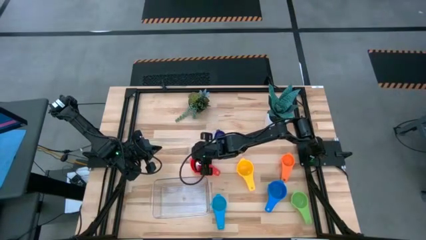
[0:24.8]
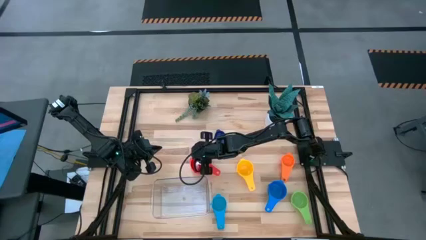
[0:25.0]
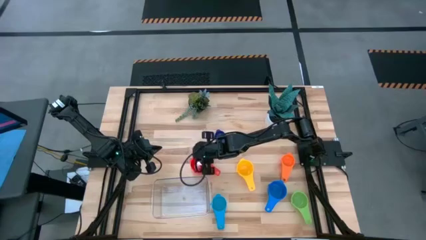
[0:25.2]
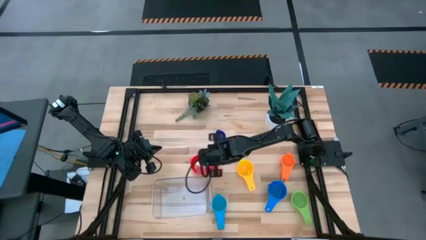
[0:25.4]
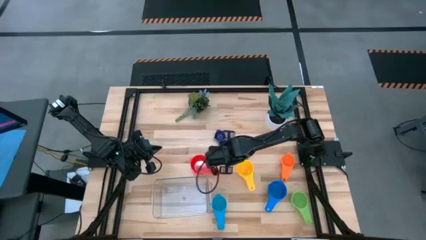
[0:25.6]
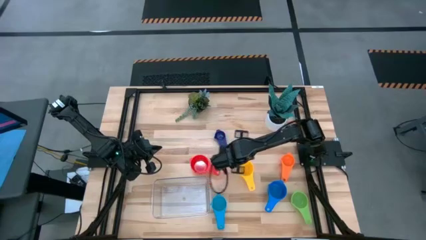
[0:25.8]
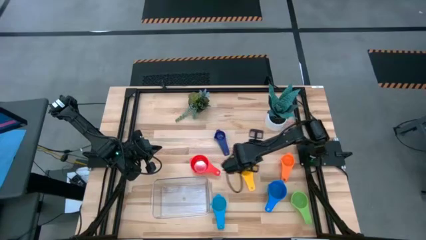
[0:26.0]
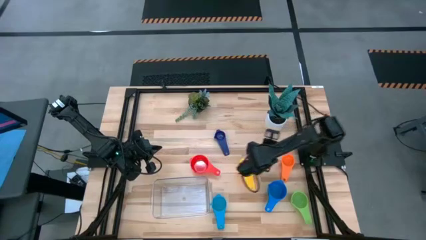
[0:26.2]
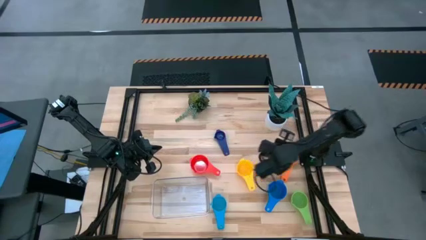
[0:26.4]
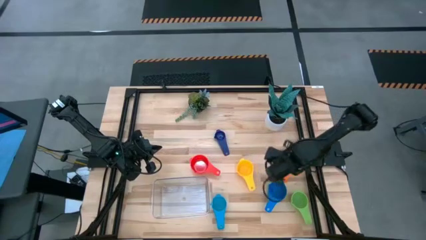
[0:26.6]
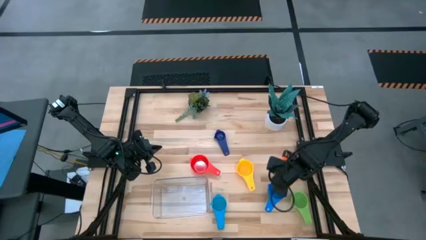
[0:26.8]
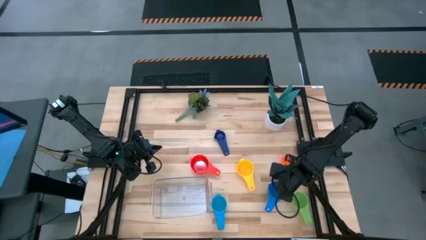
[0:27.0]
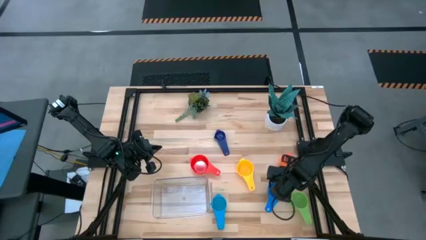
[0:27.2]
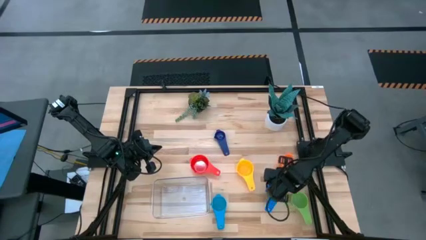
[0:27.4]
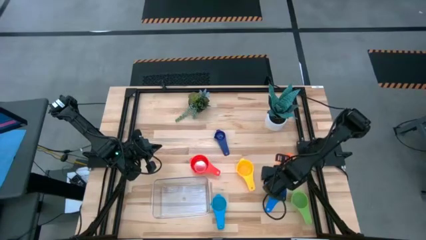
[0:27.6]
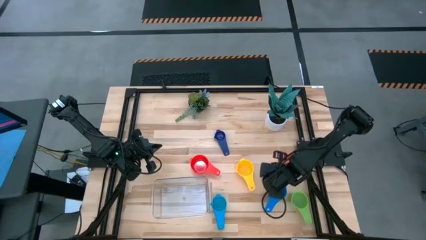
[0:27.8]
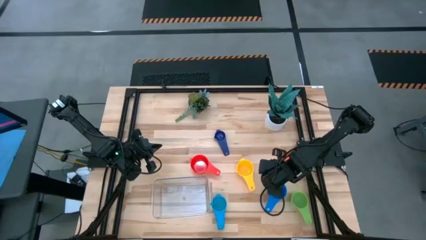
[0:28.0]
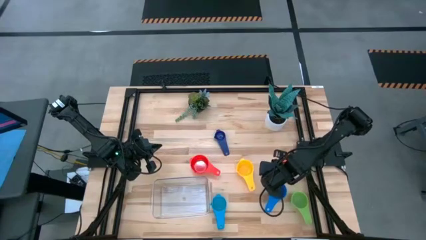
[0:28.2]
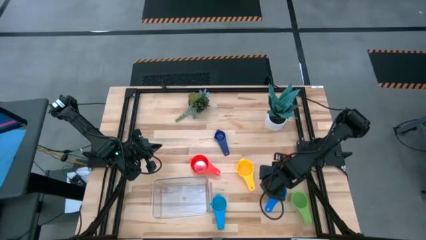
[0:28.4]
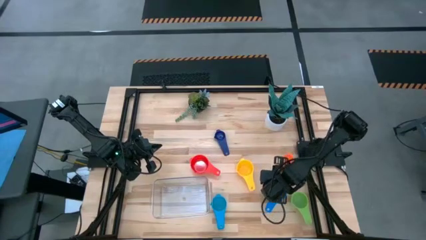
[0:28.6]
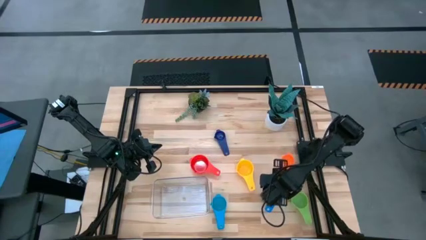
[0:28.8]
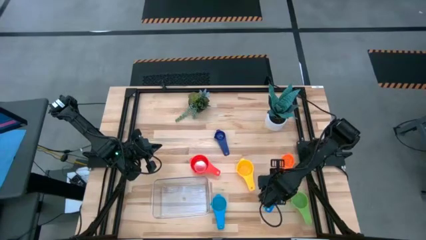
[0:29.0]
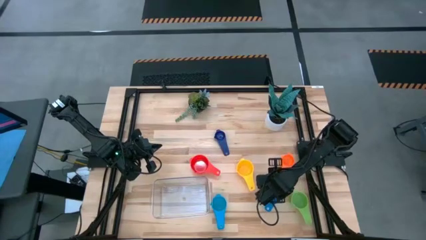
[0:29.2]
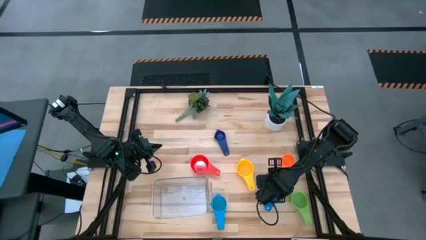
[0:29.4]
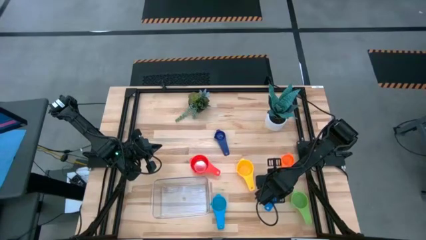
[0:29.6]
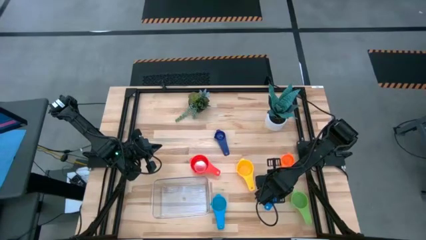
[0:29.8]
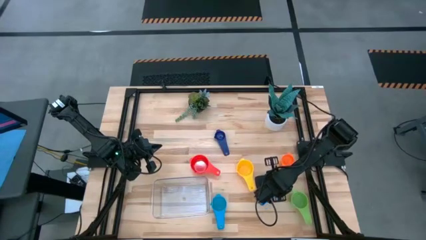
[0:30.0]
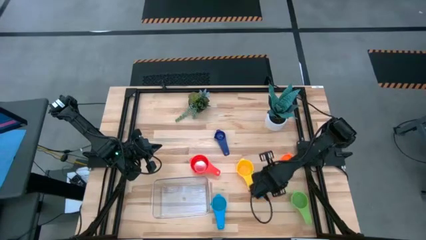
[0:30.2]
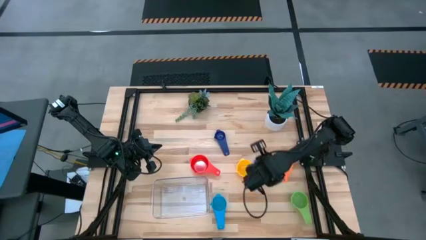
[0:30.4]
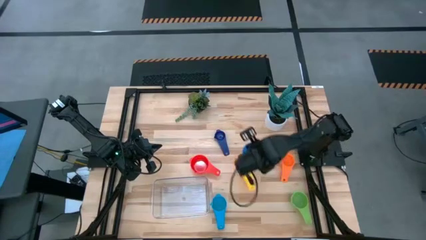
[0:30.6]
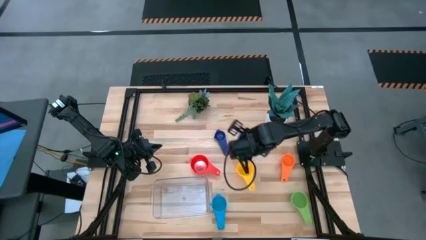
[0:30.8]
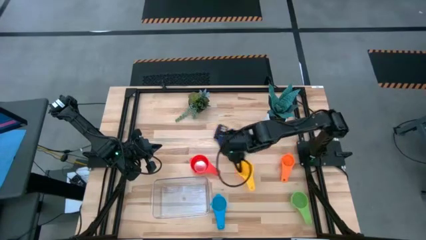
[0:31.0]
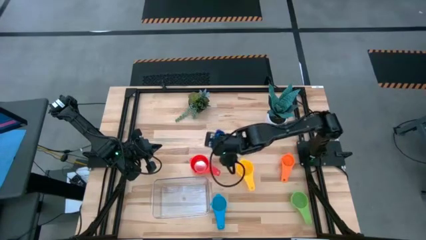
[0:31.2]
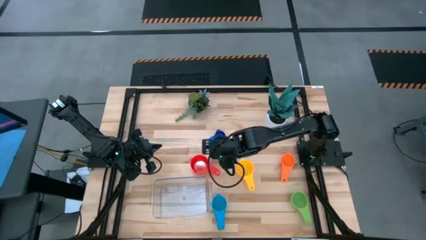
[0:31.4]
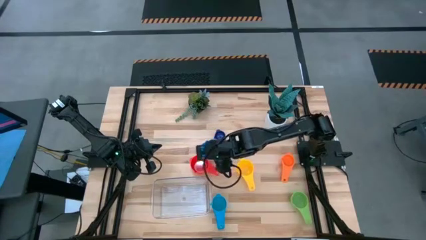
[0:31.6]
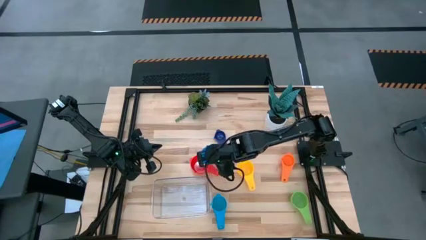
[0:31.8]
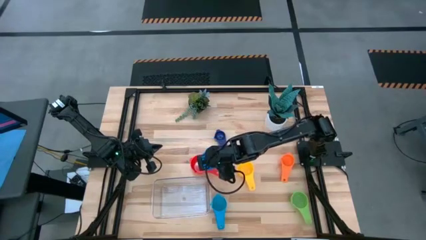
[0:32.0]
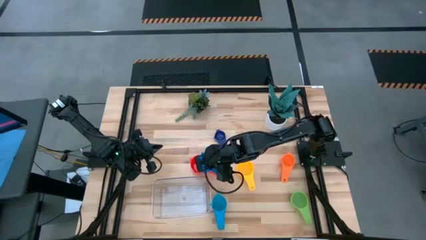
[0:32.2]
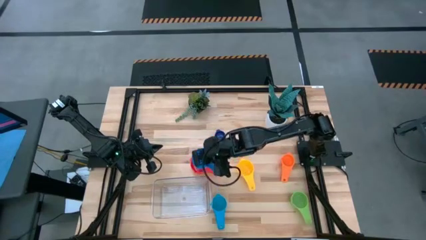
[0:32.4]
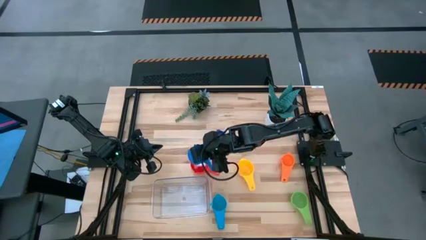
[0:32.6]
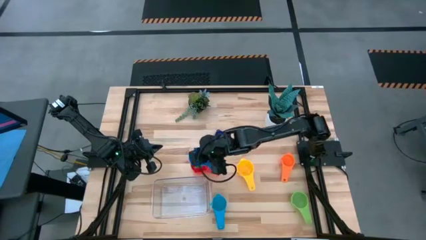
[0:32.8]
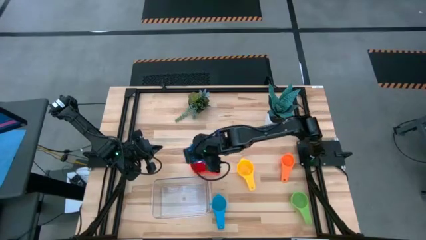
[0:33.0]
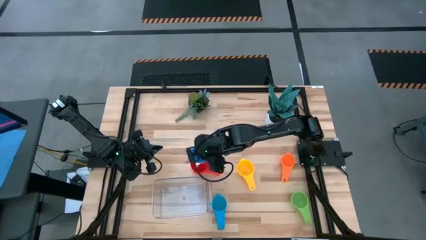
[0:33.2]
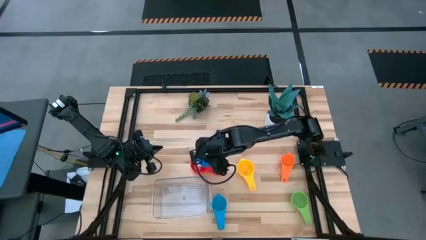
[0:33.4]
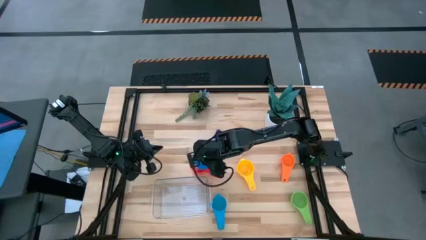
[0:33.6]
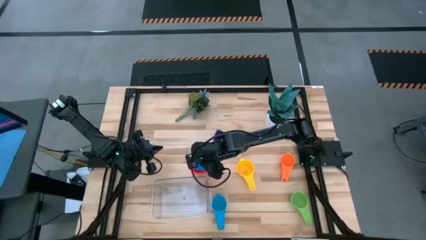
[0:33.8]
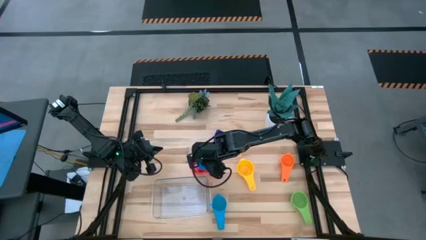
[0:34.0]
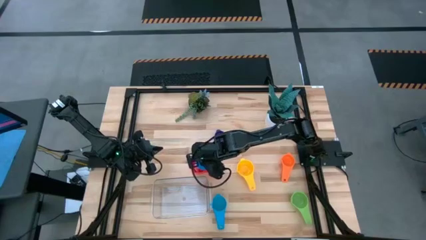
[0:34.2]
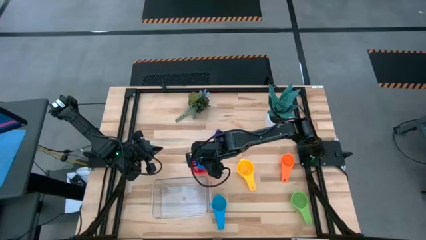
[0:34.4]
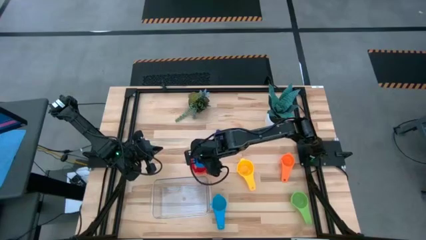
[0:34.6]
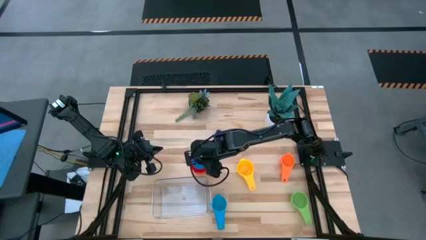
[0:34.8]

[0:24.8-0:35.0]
Task: Nest measuring cups in basket
Stack the blue measuring cup on the red measuring cup

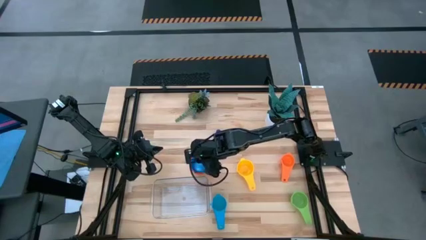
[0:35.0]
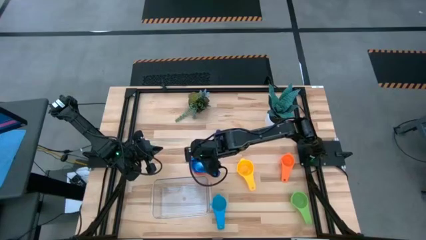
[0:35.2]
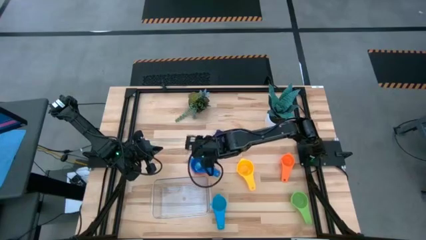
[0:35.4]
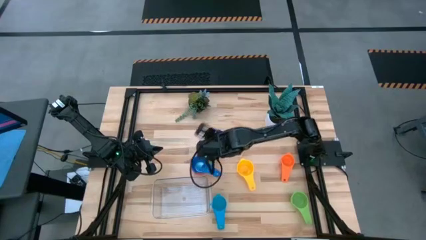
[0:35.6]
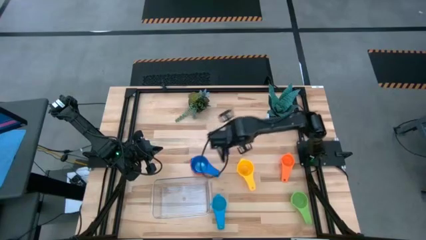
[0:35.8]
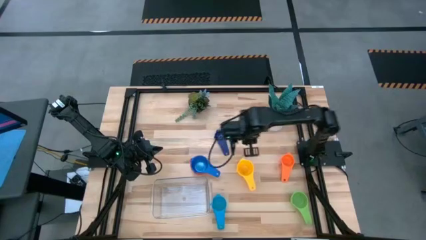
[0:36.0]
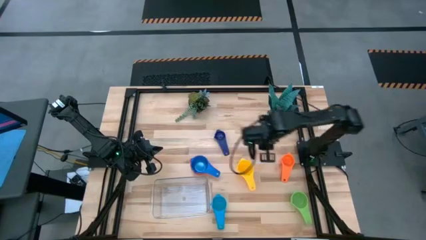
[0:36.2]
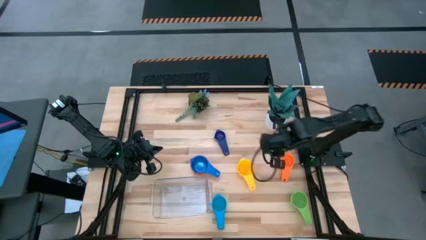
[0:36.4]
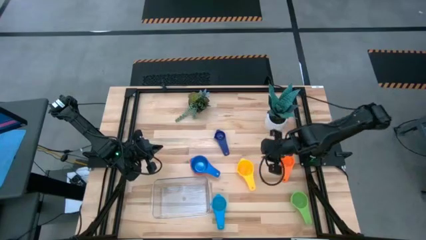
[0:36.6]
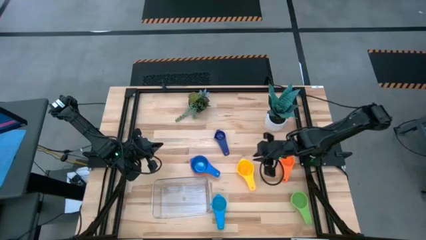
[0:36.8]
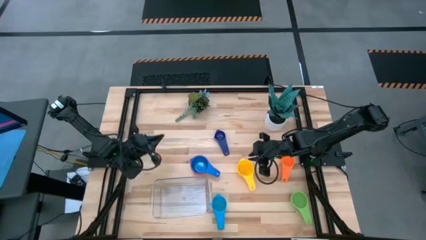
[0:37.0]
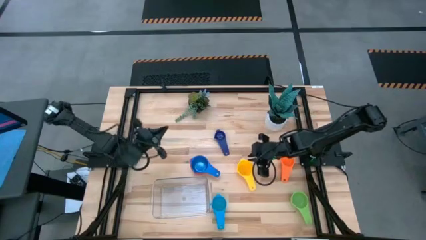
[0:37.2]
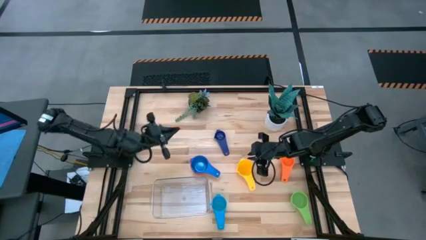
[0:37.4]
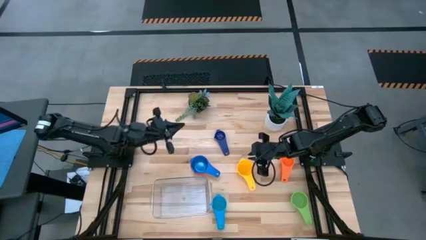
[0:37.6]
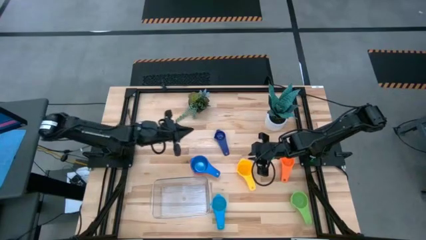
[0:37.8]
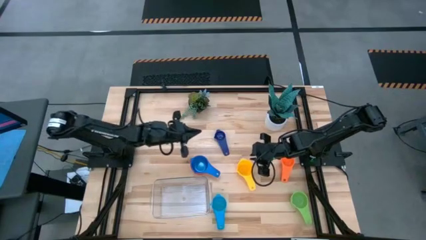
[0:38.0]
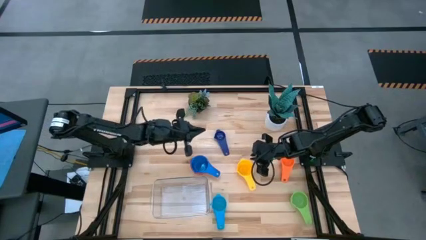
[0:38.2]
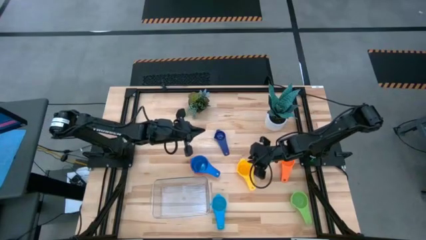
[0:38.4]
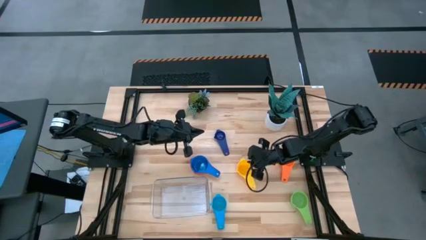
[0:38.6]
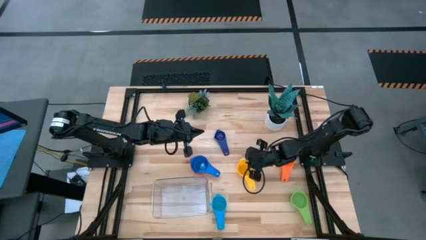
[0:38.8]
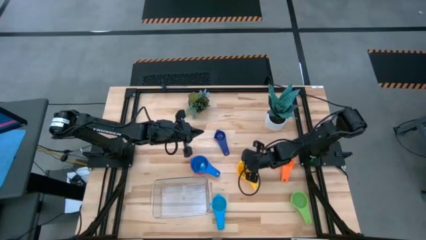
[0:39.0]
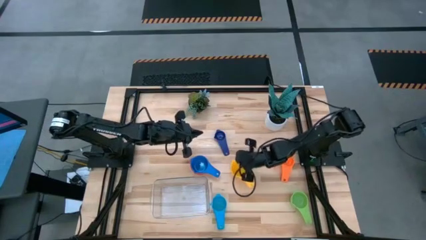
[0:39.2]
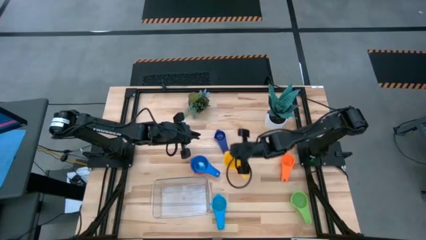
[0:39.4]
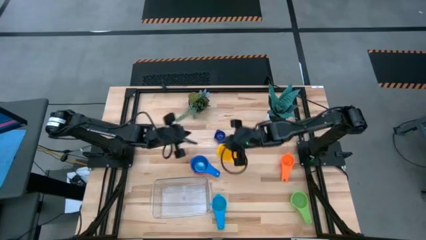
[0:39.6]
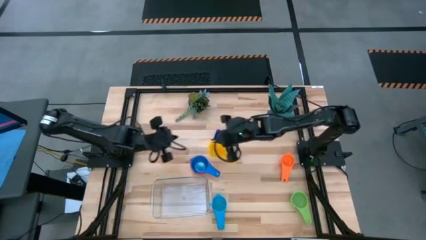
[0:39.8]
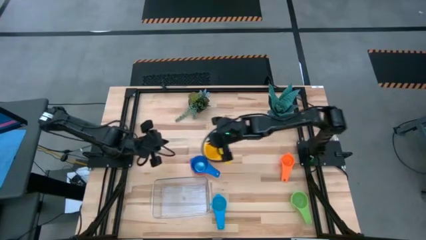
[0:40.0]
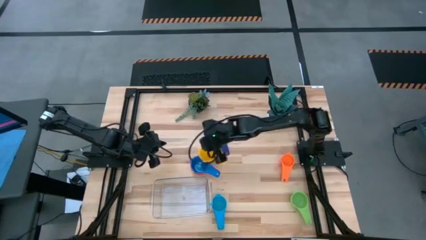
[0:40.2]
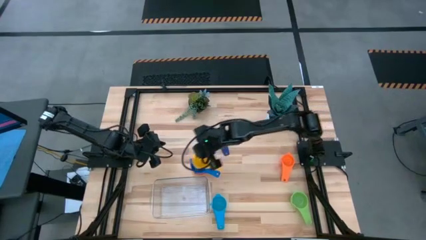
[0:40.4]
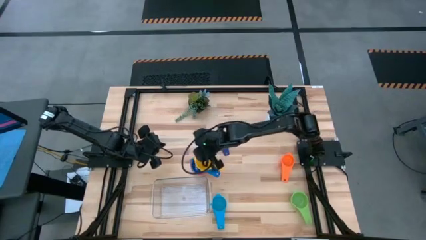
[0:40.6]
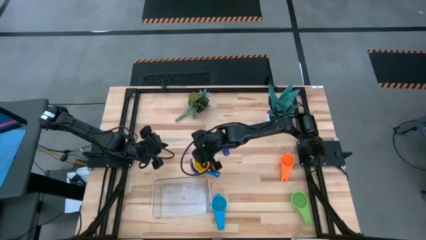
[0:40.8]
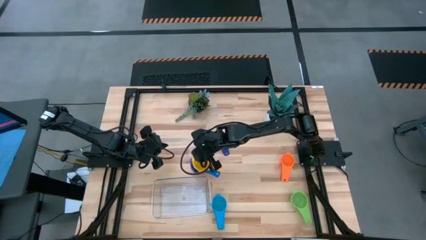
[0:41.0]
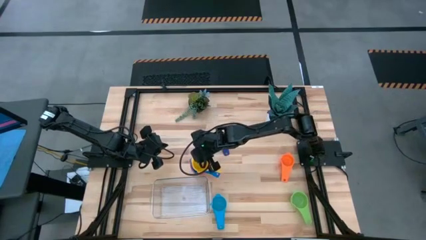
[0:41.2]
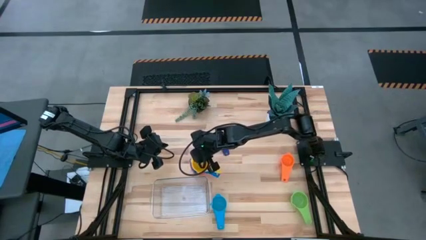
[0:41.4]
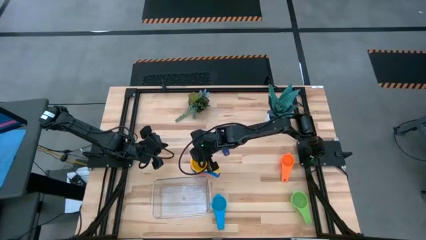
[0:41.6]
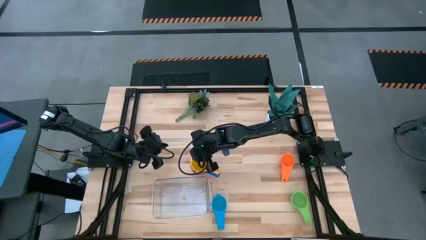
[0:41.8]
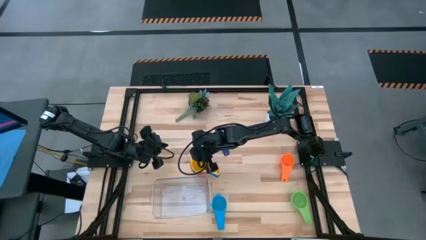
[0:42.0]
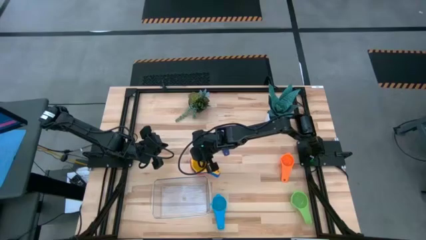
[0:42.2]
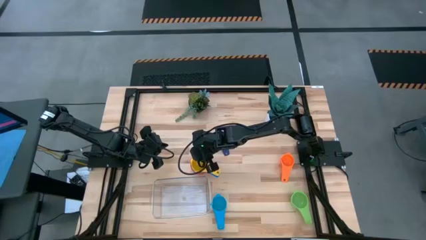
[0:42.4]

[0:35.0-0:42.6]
Stack the yellow measuring cup on the blue measuring cup
